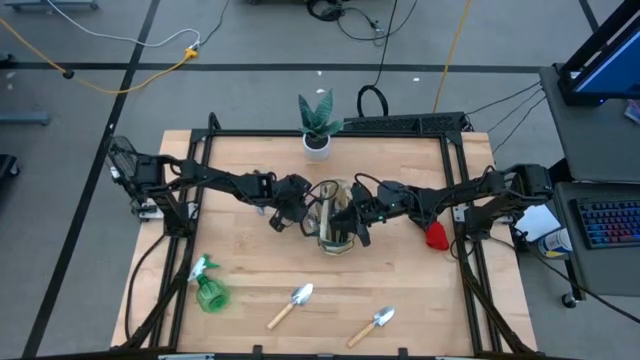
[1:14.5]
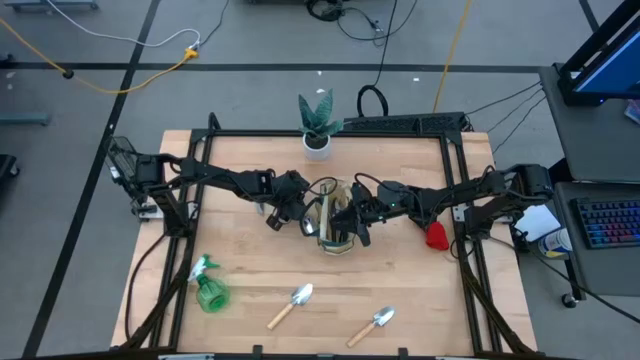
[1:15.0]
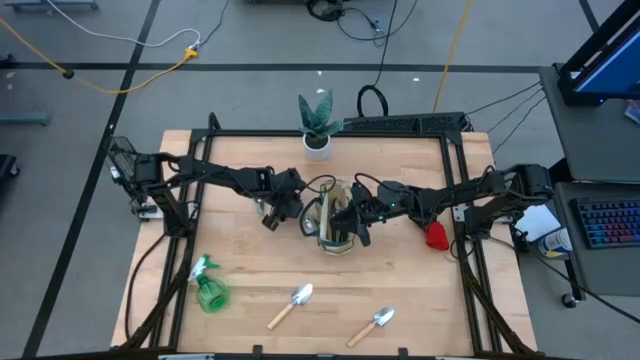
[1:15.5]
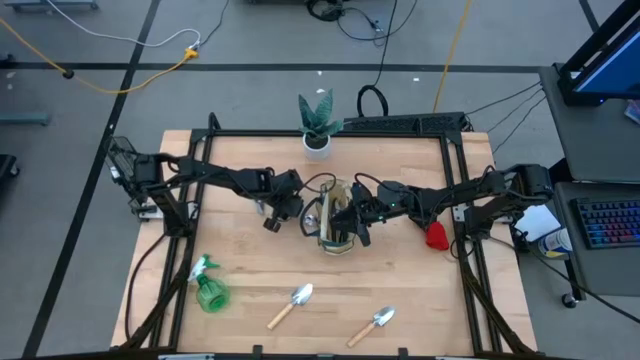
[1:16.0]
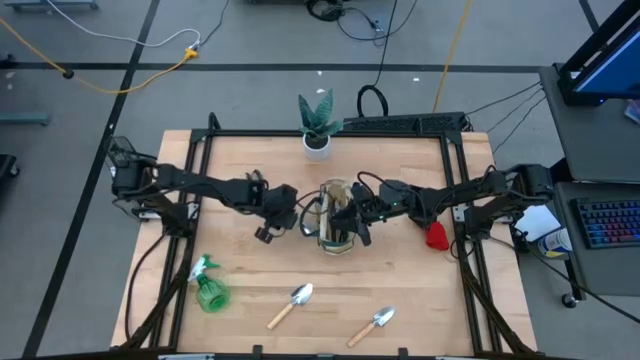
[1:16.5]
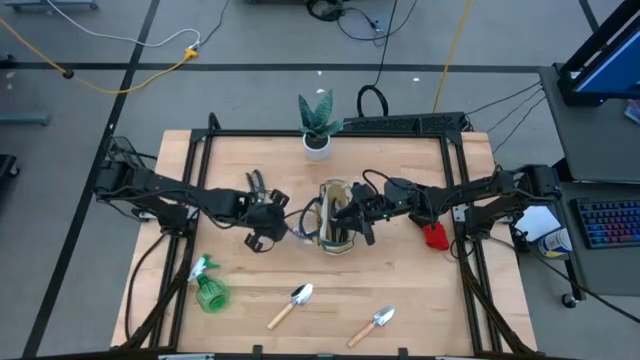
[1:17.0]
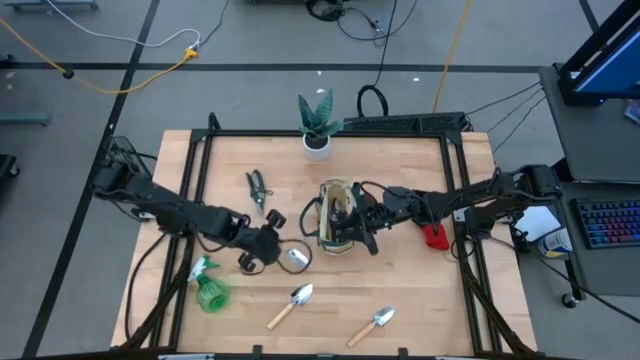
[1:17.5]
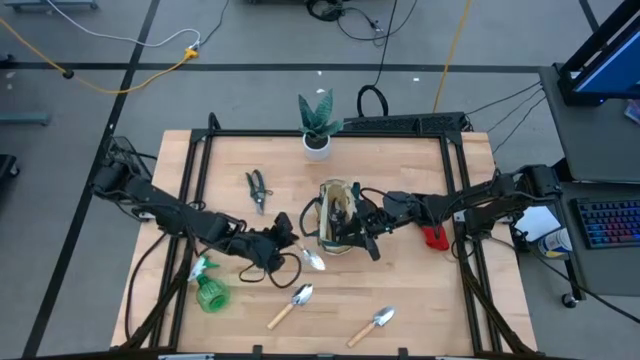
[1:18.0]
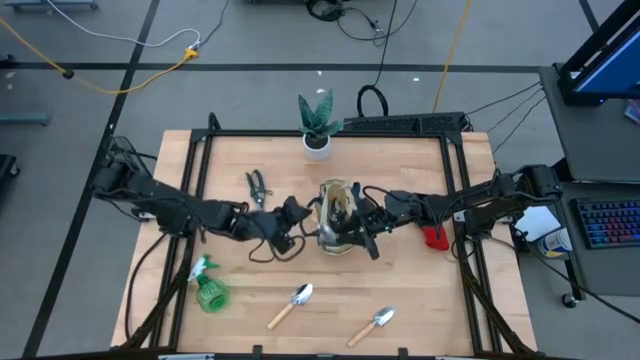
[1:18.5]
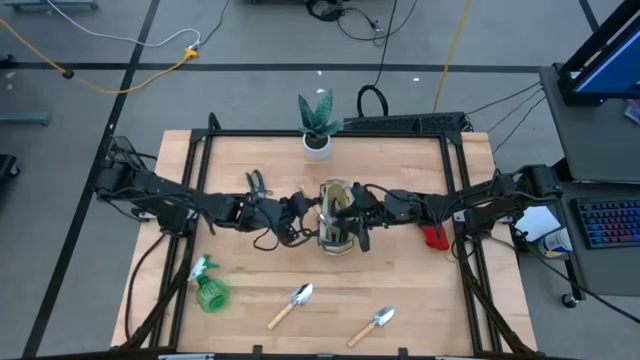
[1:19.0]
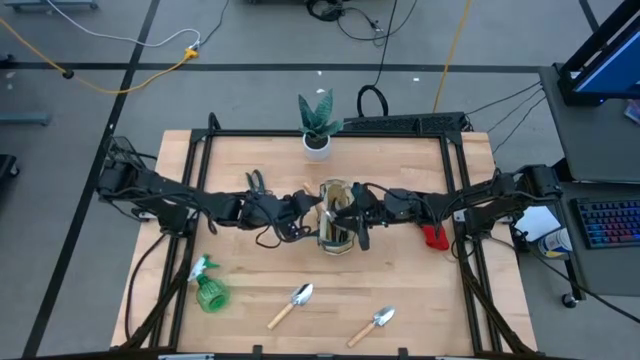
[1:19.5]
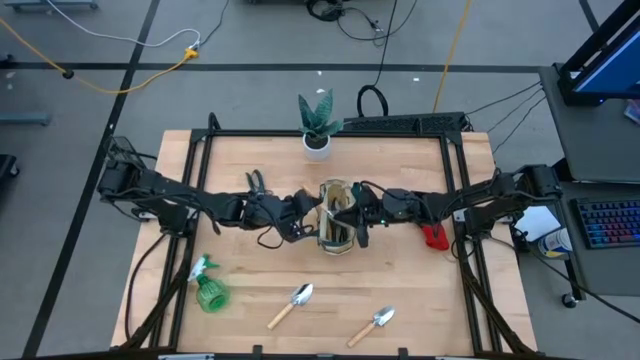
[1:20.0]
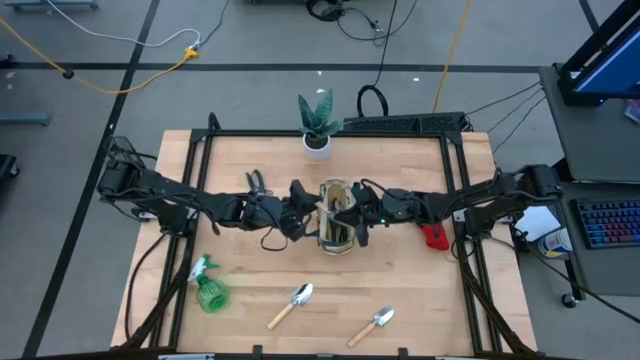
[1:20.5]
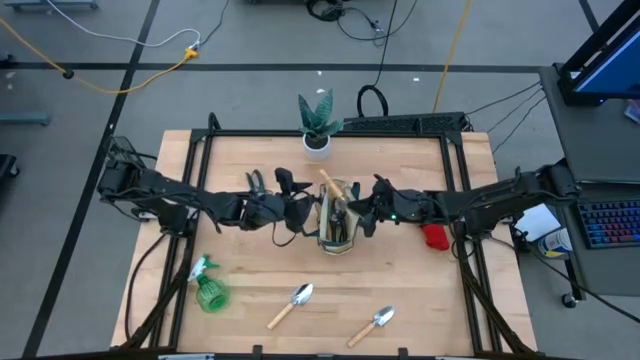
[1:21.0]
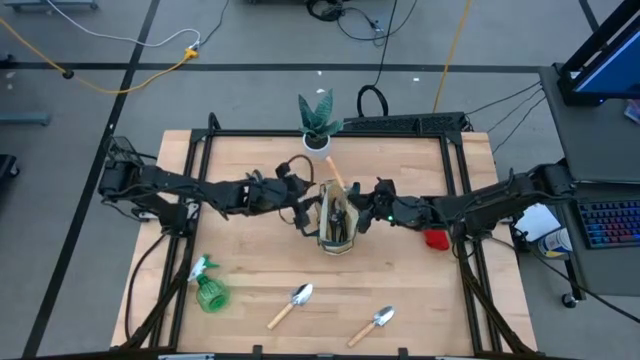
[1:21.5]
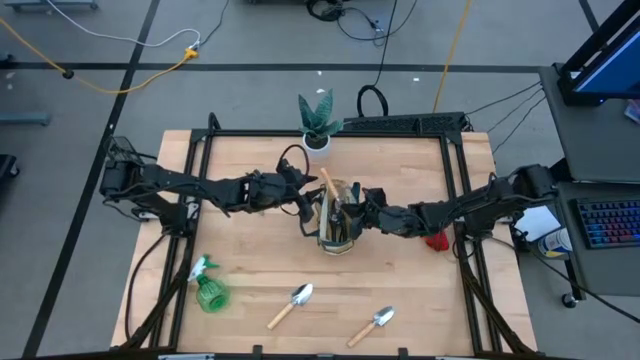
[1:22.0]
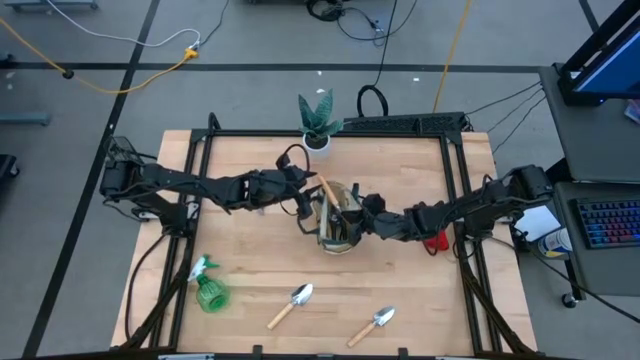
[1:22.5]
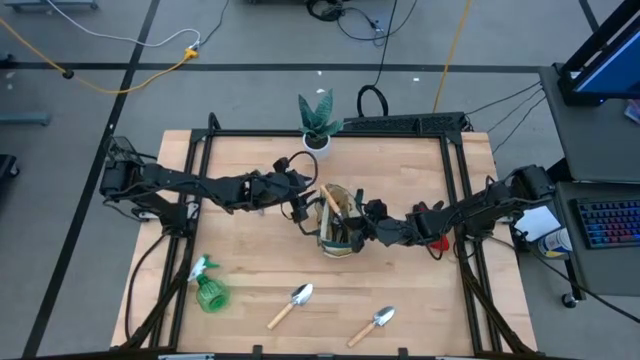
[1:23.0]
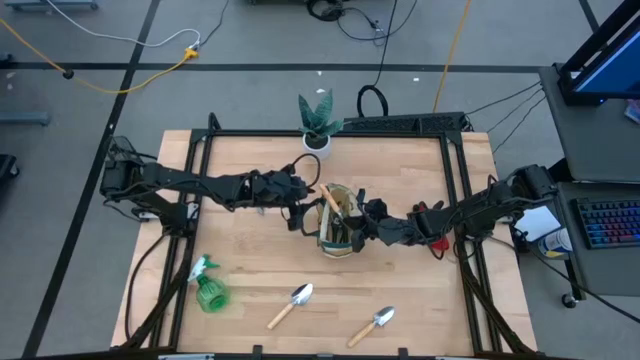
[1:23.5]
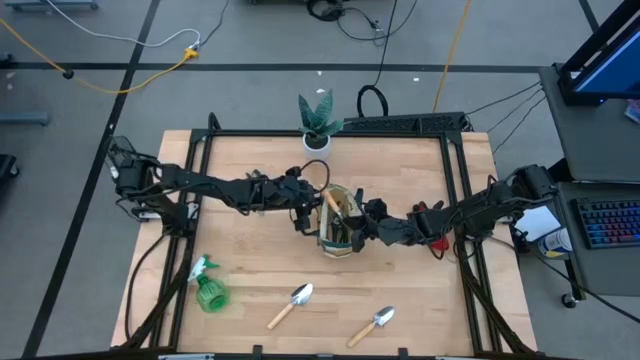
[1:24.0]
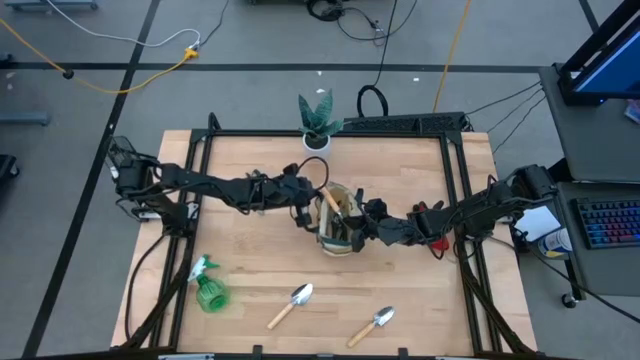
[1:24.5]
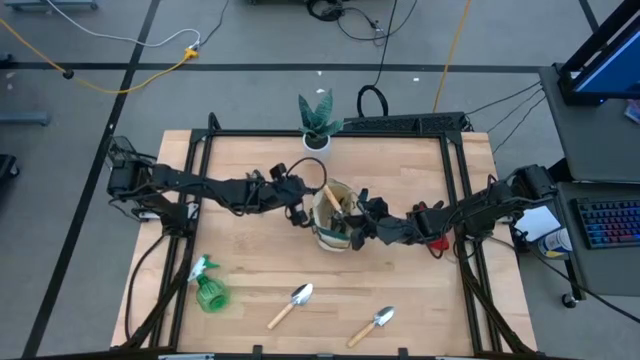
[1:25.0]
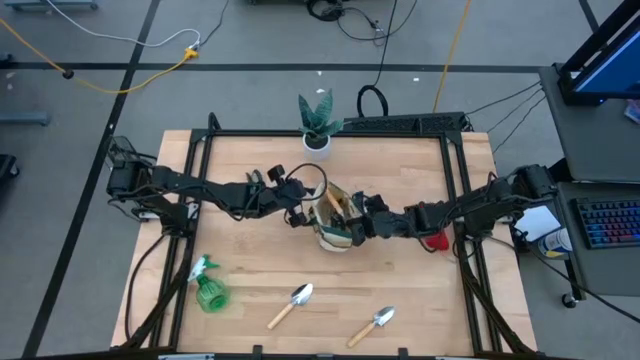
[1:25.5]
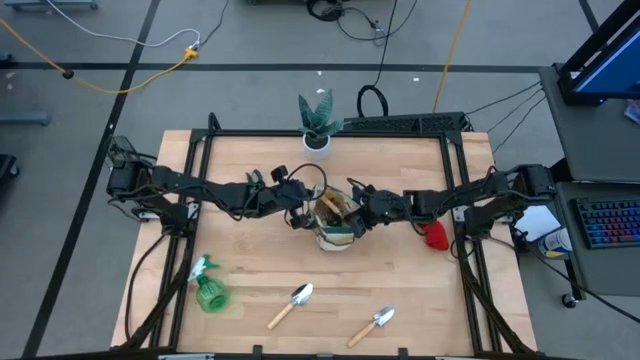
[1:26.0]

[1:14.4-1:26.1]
Task: Pick & Place Garden tools in Gardening bag
Put the top brown trowel into the gardening bag

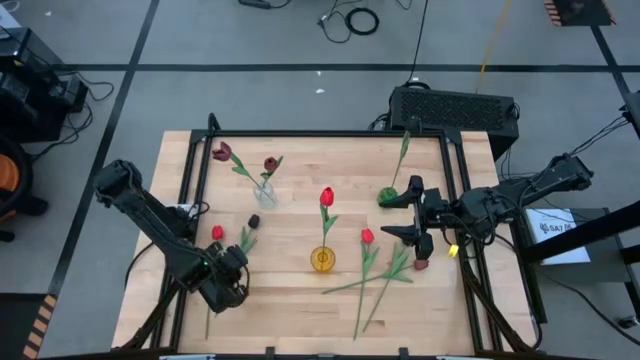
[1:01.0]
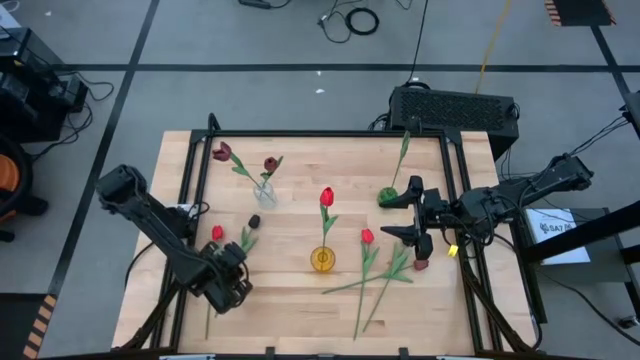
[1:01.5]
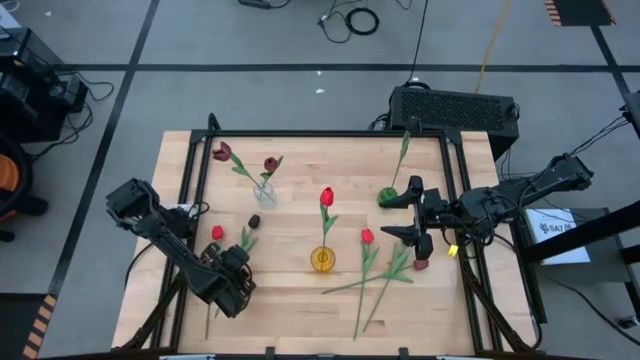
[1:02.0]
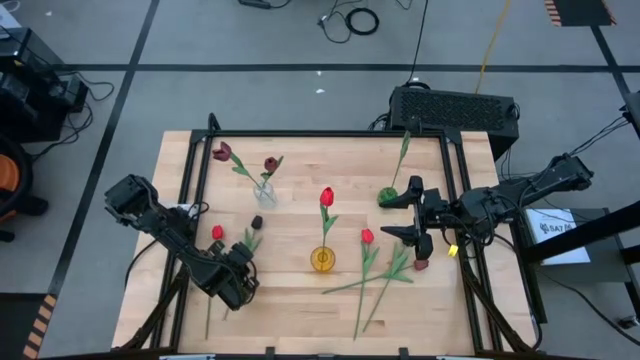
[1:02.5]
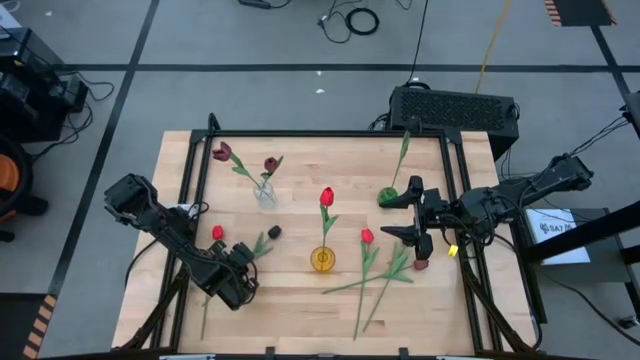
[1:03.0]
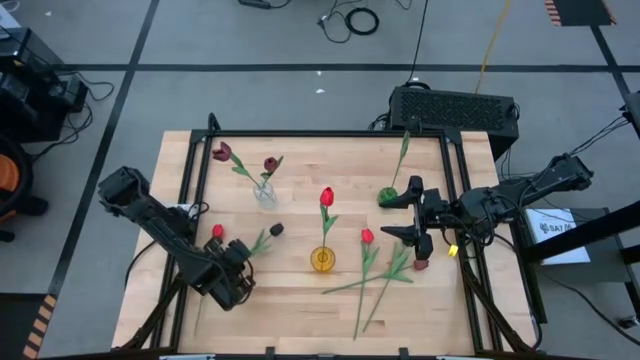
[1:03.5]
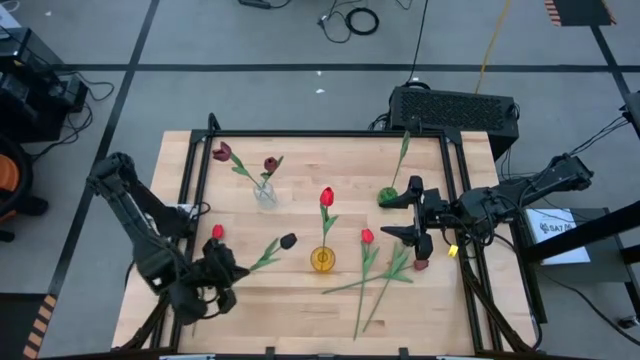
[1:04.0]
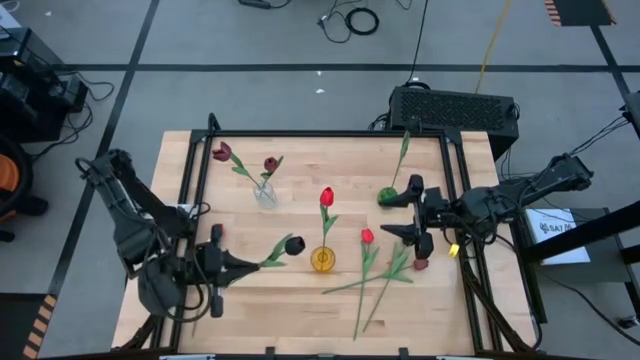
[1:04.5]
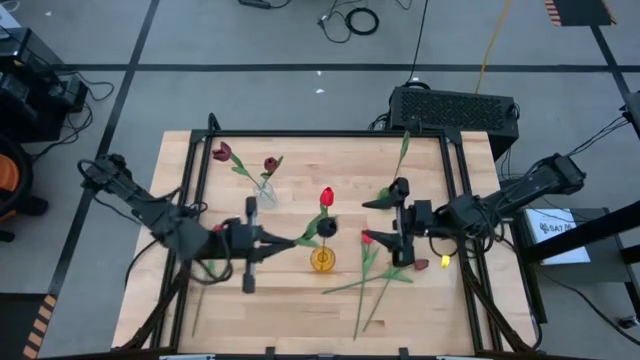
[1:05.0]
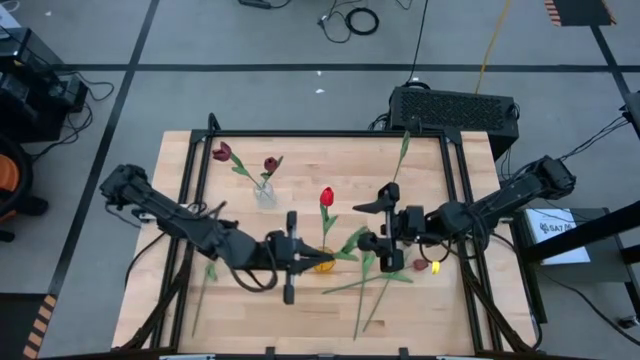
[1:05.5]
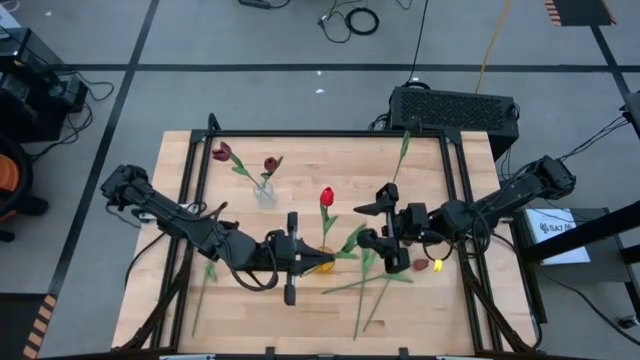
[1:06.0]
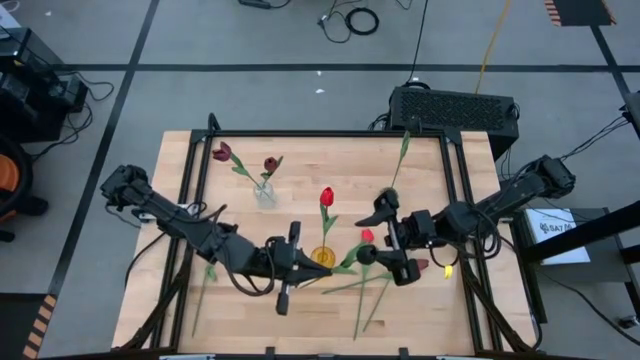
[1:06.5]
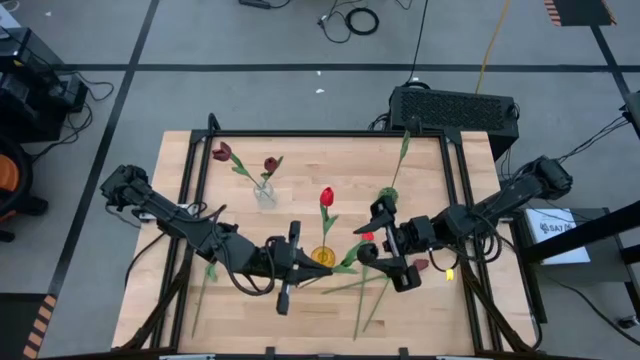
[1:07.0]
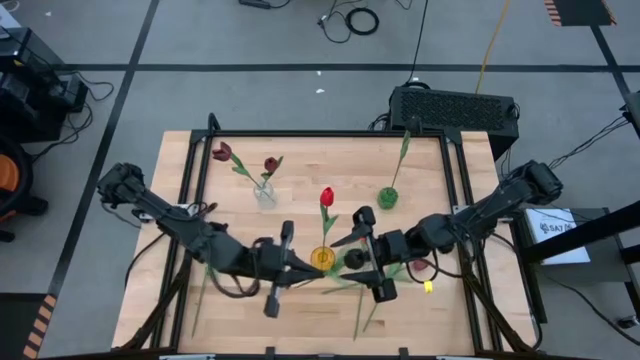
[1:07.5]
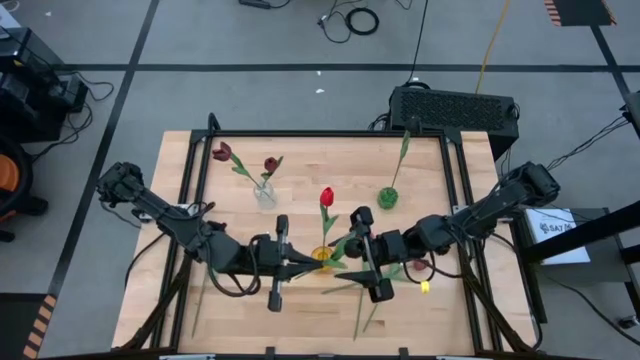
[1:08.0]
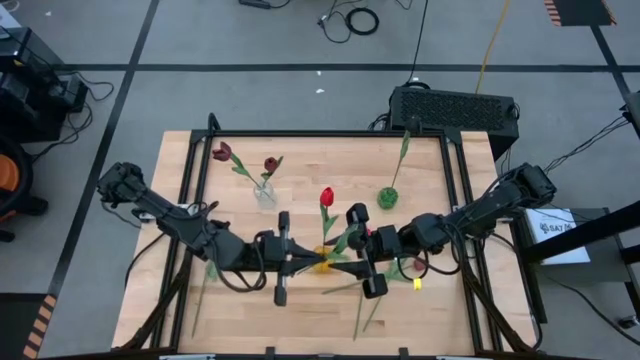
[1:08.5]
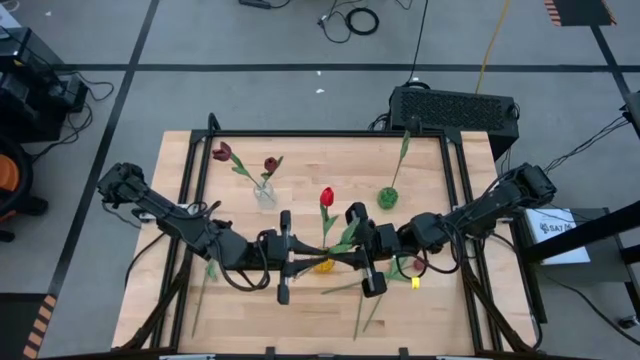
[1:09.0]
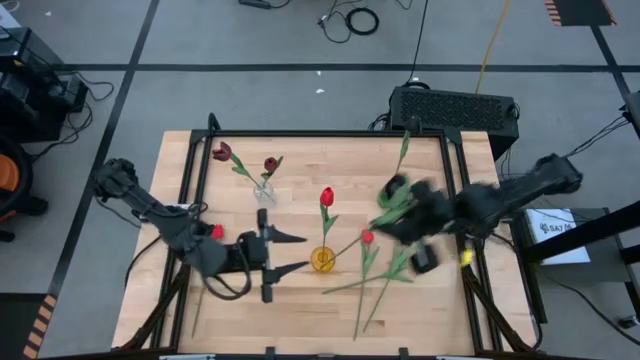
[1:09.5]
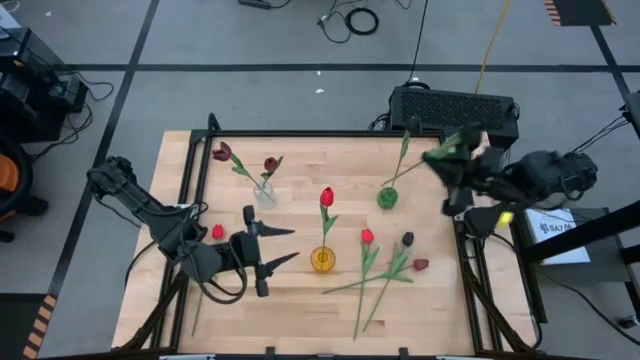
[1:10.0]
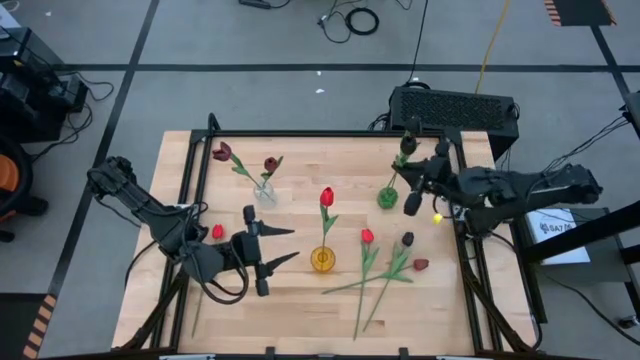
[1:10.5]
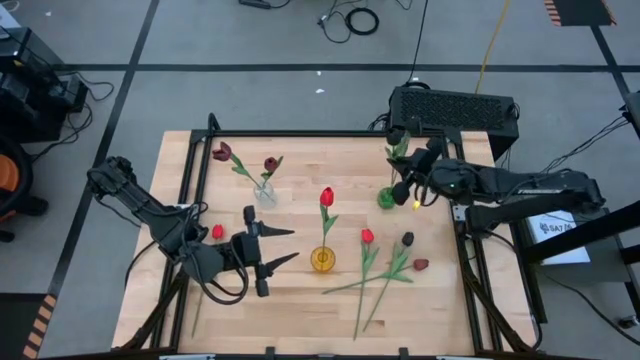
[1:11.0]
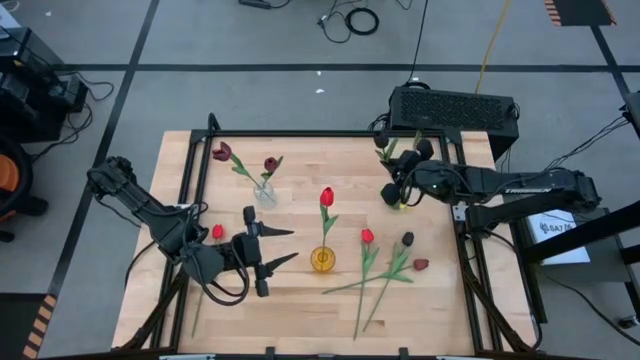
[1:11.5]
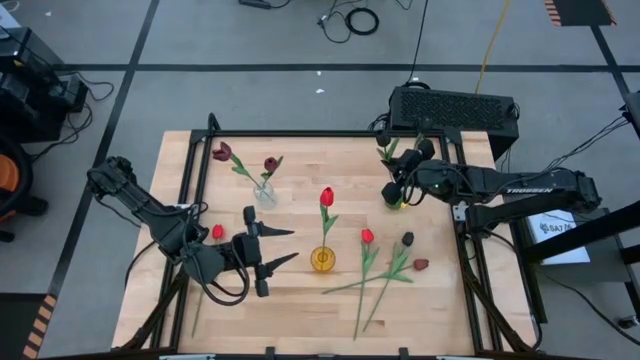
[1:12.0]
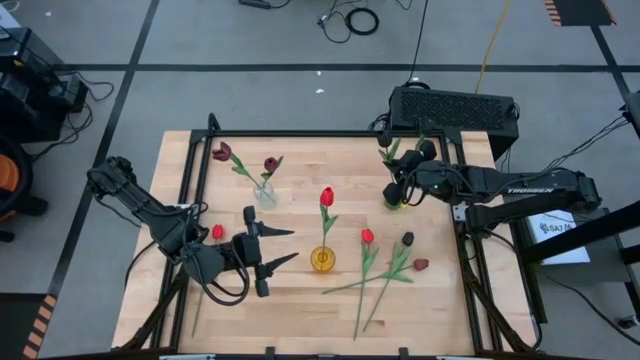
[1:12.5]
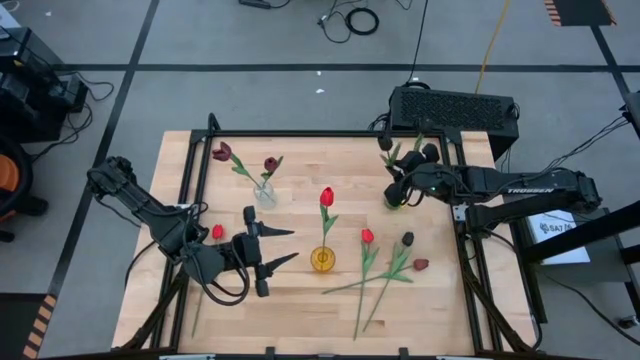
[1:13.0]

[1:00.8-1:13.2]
Task: Sort flowers into vase by color
Put the left black flower into the green vase
